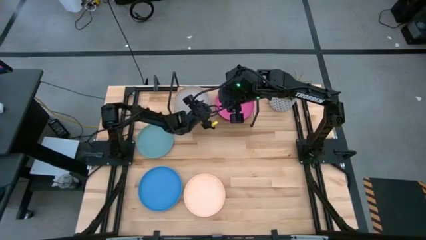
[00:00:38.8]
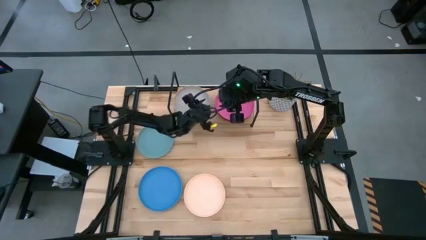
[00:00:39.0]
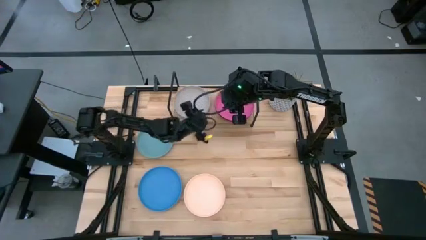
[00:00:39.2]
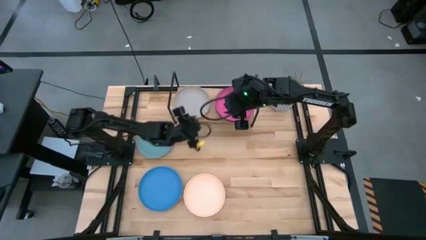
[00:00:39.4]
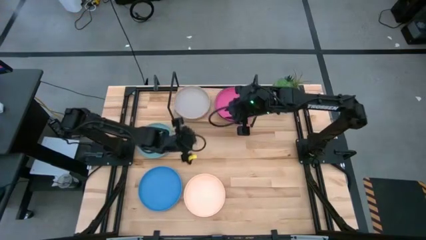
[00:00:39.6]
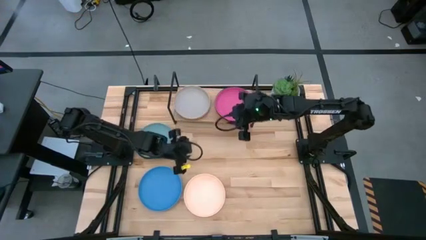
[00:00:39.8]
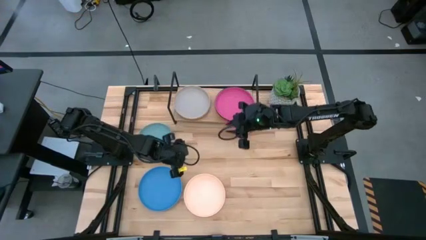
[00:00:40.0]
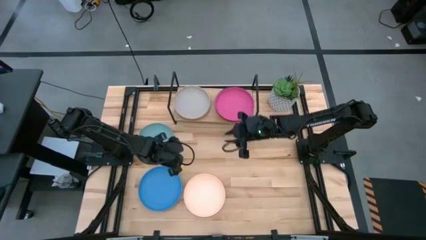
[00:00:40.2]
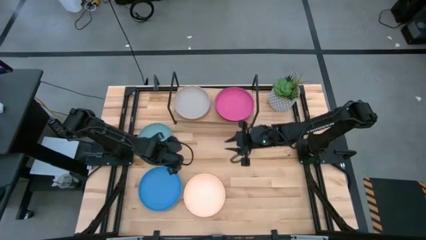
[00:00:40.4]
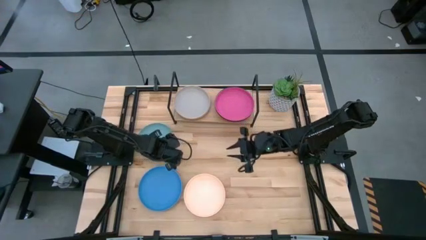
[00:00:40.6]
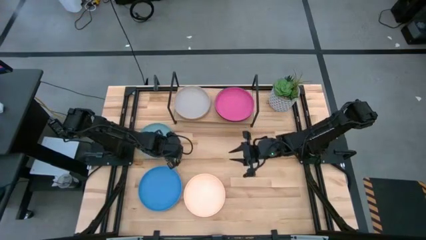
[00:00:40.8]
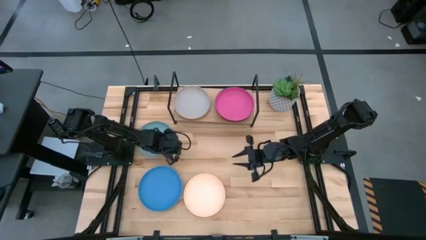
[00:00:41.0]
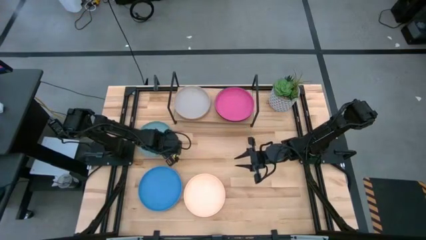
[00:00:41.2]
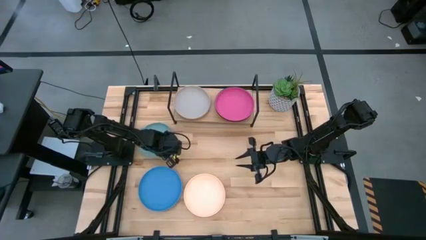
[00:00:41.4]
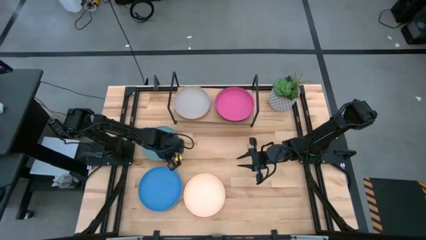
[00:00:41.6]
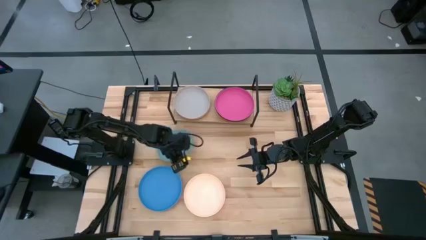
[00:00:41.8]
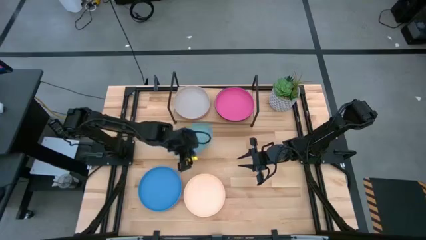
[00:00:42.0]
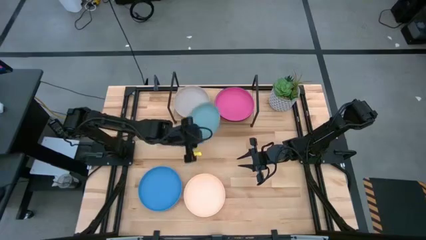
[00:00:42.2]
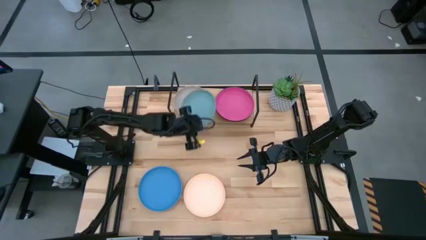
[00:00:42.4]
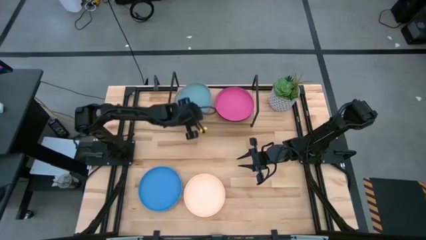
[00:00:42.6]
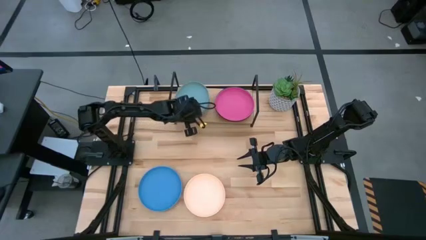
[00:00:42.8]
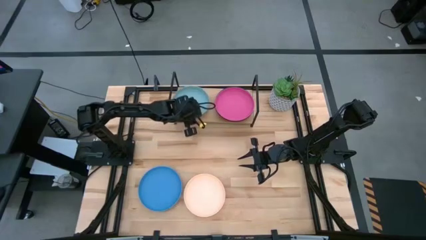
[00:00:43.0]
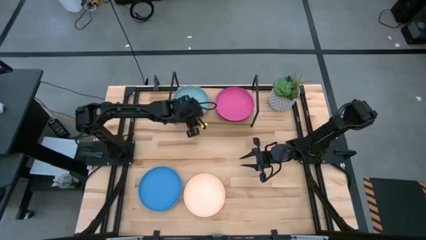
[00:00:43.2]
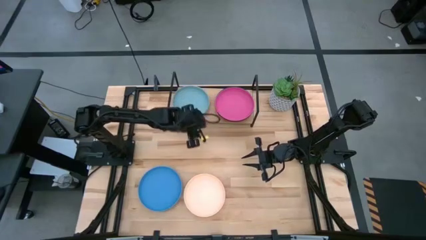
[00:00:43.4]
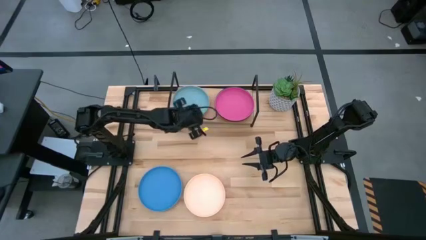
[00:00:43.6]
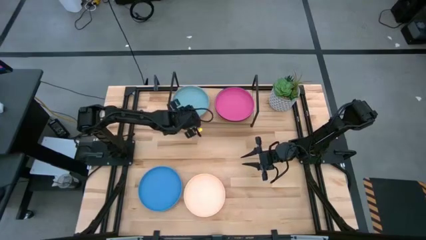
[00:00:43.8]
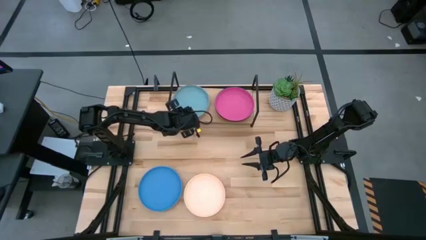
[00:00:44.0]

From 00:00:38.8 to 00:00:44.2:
Task: Place and stack plates onto a shelf
Stack the light blue plate on top of the gray plate on the shelf

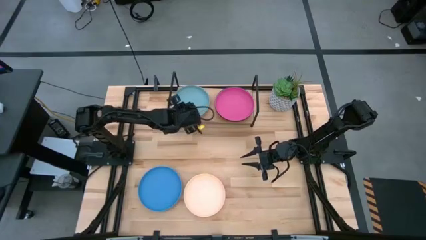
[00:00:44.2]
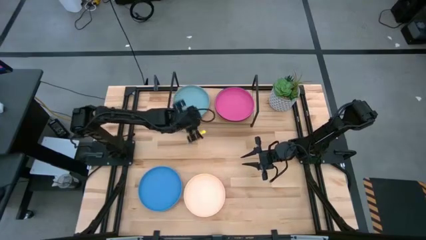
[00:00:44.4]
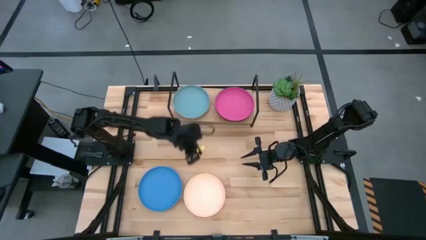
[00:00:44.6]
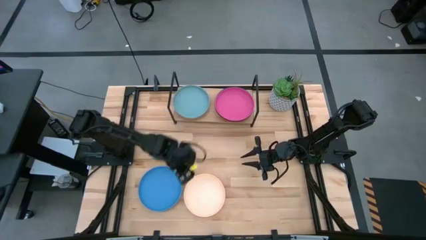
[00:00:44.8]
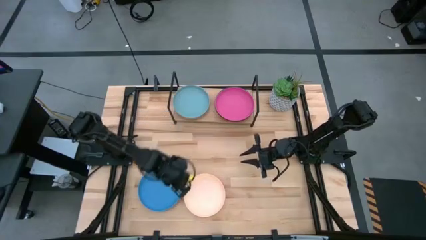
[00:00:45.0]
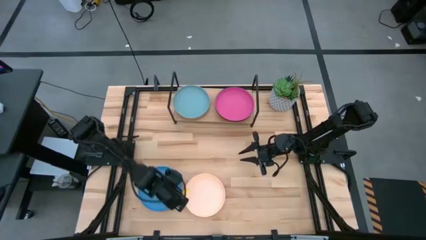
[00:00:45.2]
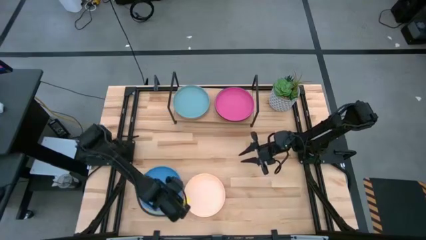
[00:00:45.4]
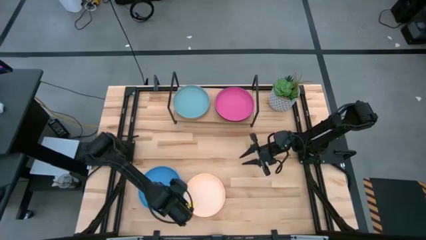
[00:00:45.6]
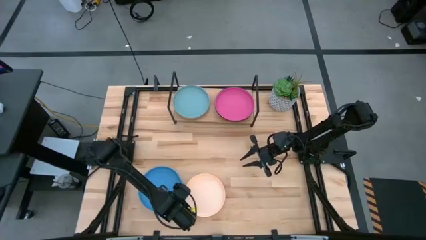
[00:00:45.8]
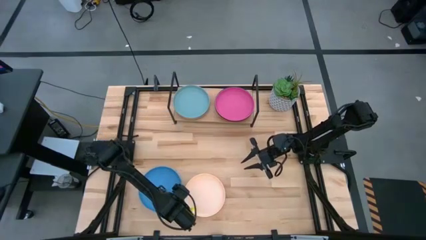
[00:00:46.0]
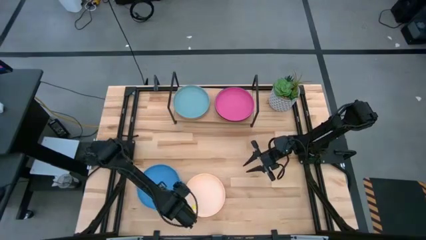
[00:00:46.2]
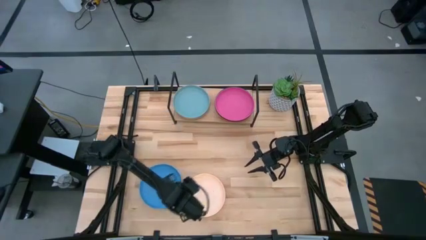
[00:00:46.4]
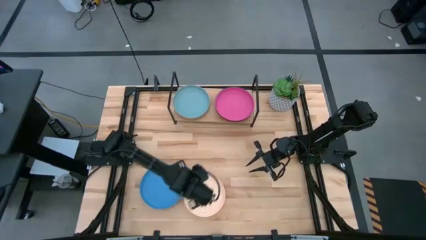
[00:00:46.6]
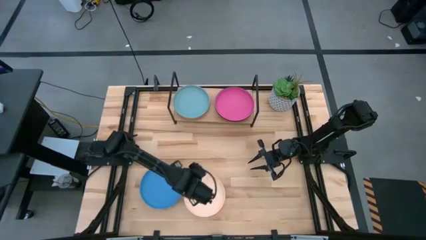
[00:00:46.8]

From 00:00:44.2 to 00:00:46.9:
Stack the blue plate on top of the pink plate on the shelf

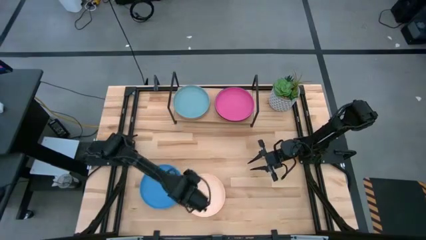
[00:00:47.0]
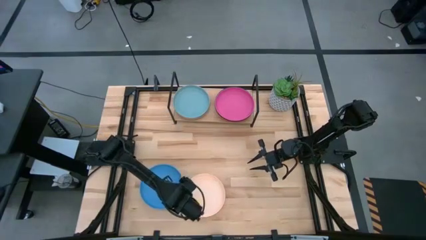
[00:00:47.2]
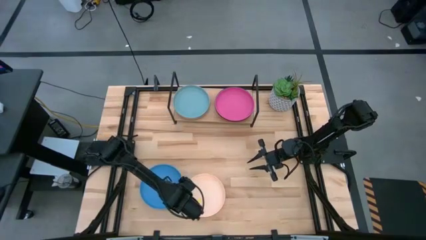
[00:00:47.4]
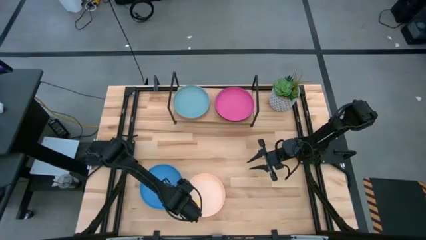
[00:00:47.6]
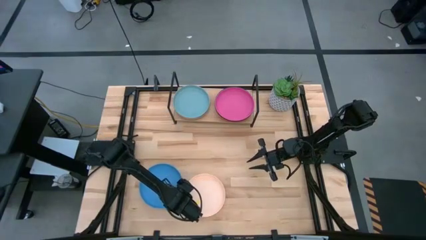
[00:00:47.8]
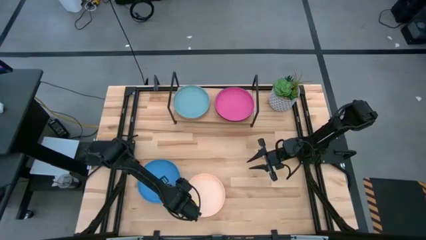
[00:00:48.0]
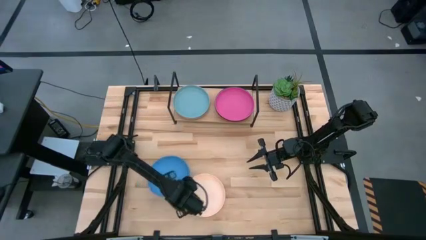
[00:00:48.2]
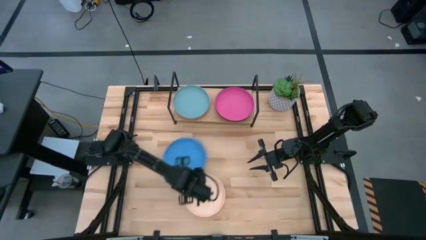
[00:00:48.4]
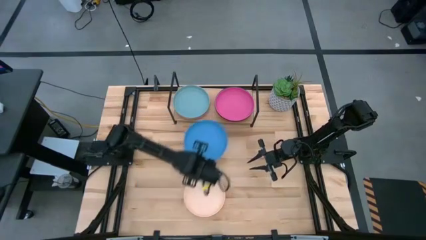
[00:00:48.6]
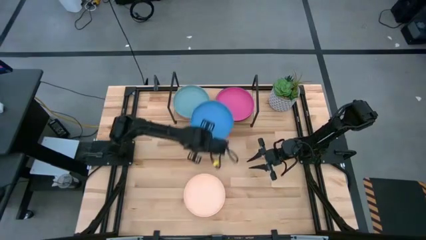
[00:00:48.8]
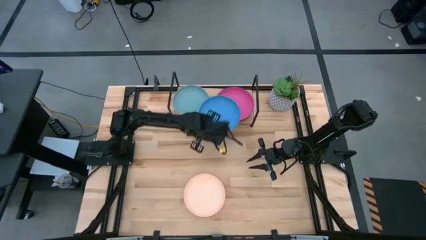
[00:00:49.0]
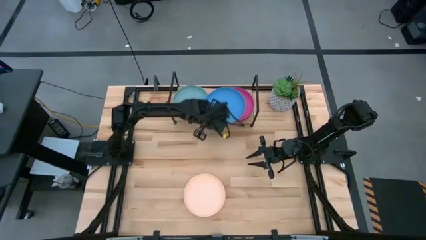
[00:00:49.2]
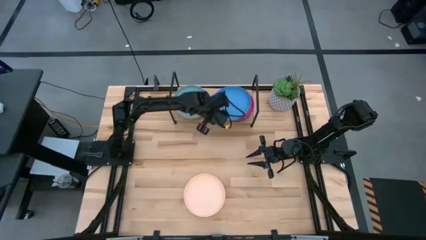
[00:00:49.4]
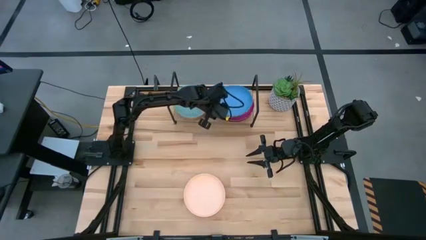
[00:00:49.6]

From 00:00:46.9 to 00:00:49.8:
Stack the blue plate on top of the pink plate on the shelf

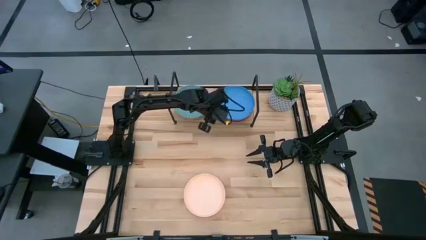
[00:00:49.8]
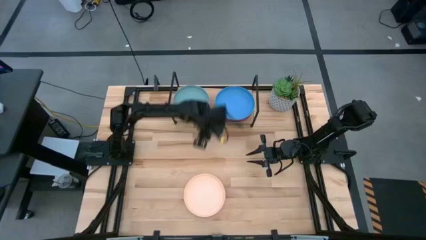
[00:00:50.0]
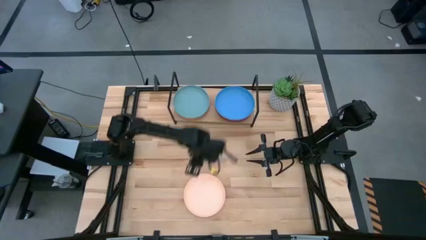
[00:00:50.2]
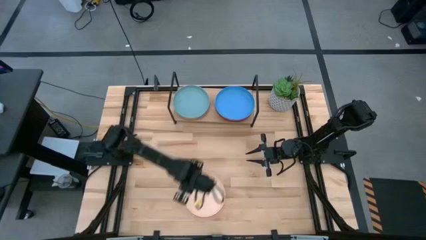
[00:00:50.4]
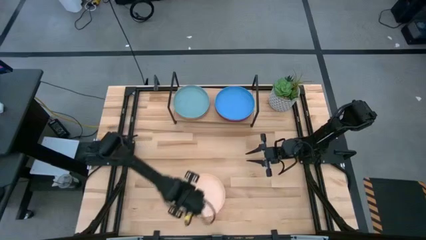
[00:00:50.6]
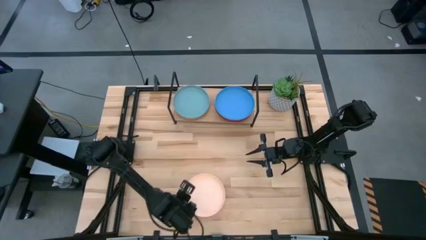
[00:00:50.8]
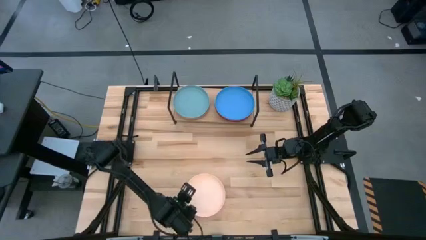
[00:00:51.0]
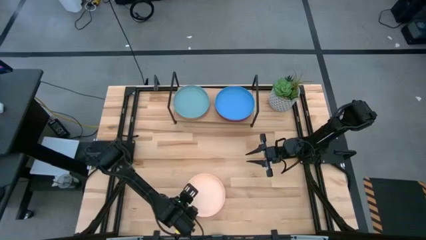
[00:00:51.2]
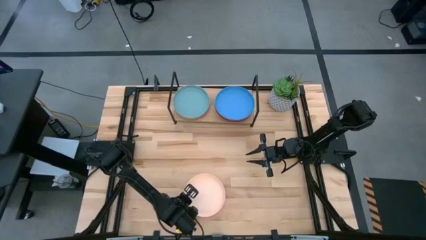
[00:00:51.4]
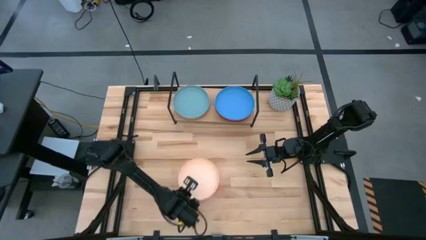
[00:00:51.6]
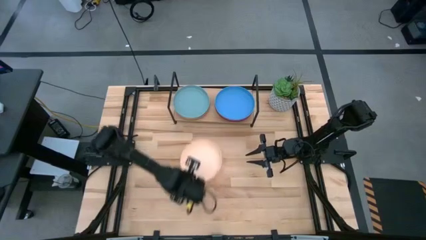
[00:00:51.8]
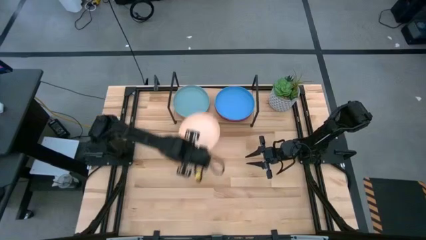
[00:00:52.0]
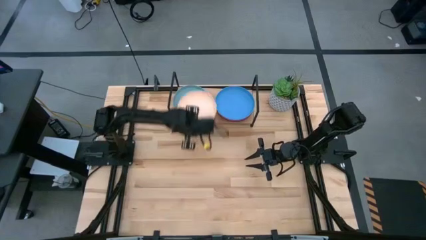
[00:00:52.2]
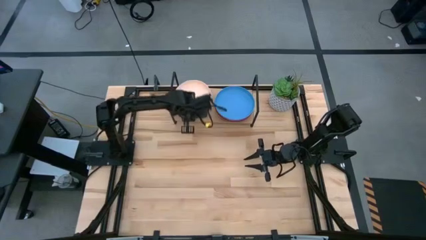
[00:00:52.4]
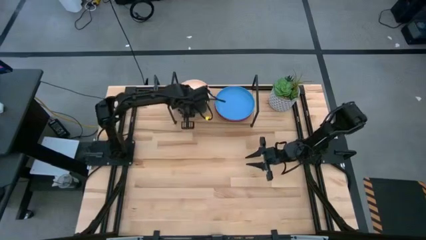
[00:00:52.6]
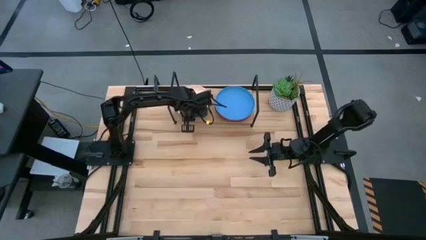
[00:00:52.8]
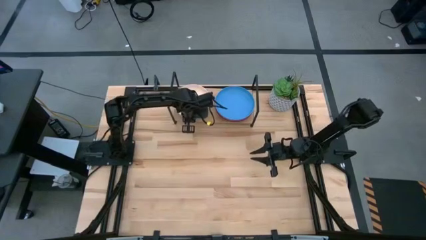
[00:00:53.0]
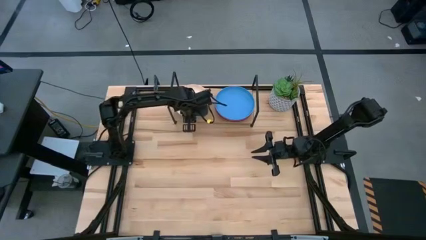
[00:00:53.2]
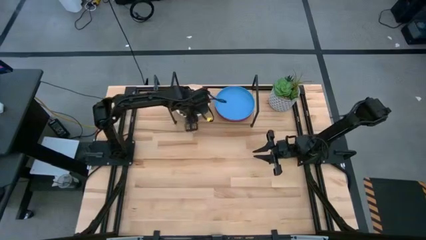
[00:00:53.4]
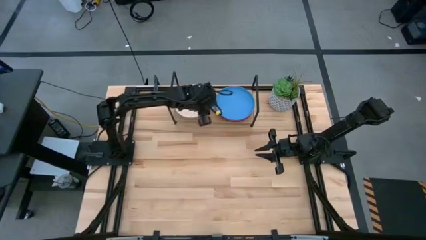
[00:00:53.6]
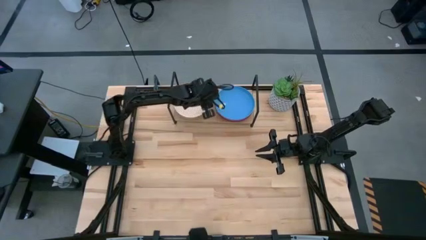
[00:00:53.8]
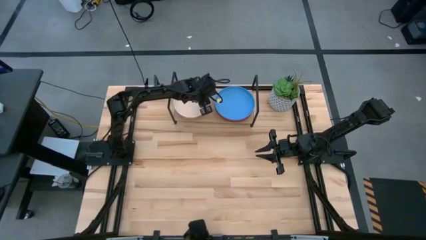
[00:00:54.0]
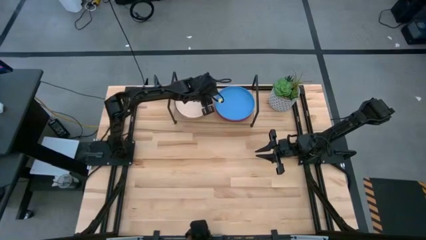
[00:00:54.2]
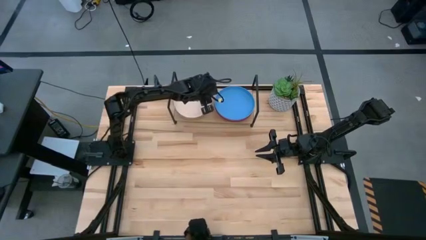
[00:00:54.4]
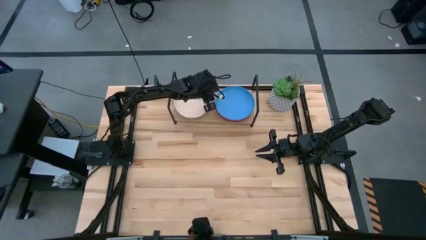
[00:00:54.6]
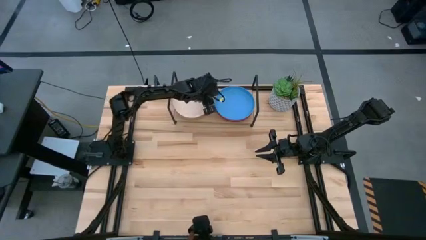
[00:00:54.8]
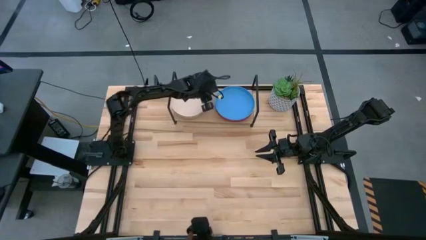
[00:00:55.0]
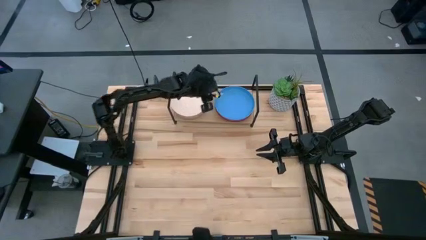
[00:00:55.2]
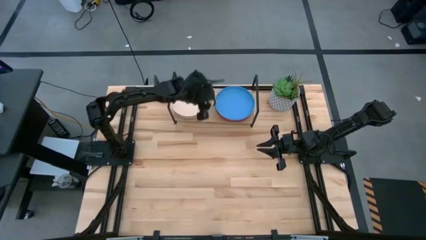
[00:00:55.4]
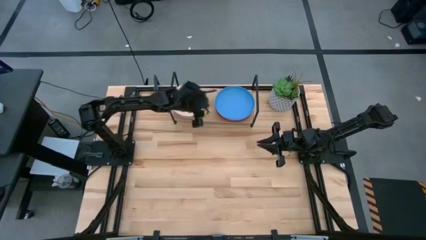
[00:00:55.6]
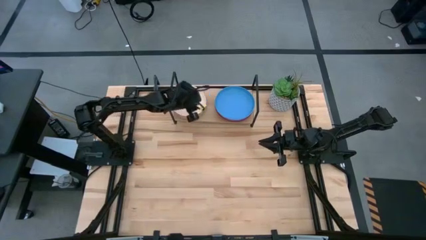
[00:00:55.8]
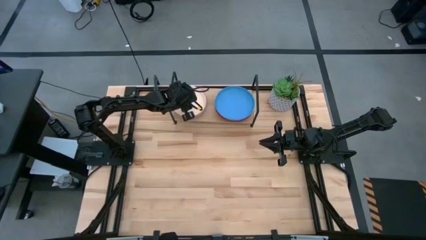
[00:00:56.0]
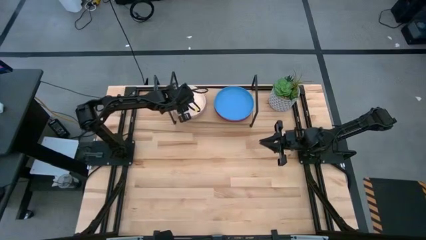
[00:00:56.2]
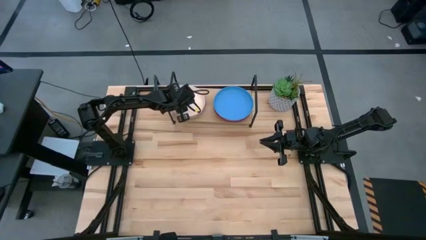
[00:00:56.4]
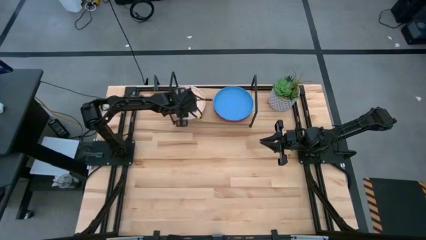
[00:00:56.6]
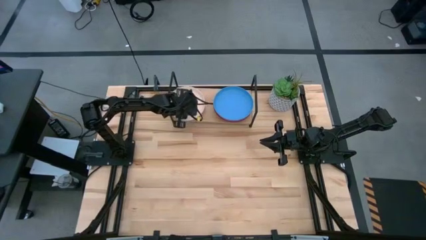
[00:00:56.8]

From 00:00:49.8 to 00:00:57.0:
Stack the light orange plate on top of the light blue plate on the shelf
